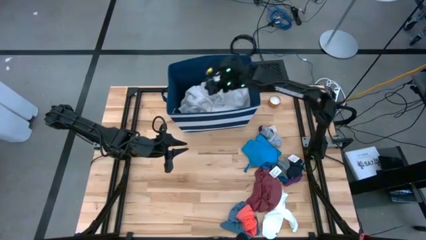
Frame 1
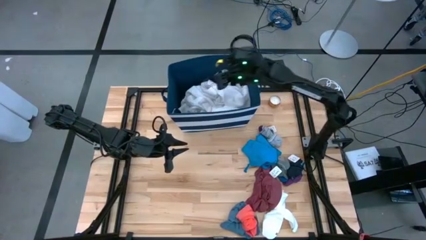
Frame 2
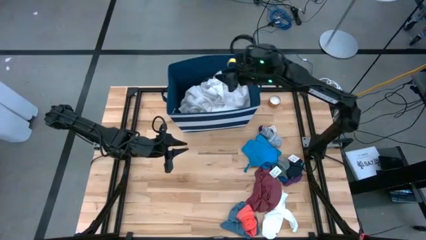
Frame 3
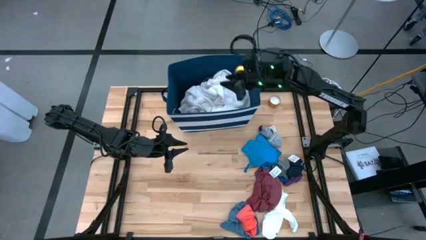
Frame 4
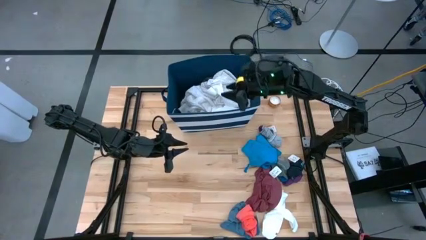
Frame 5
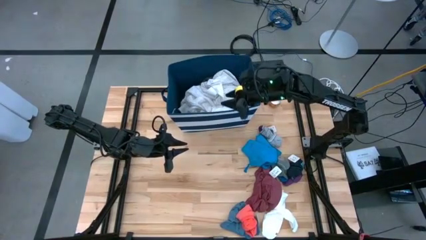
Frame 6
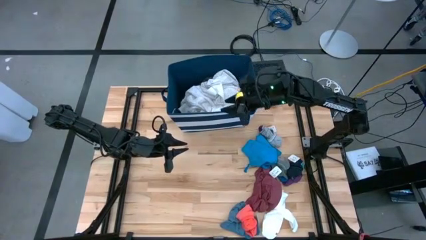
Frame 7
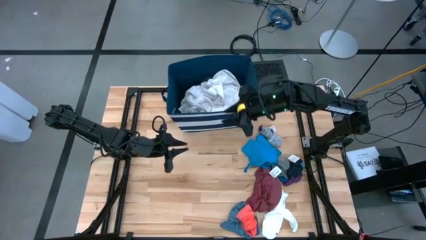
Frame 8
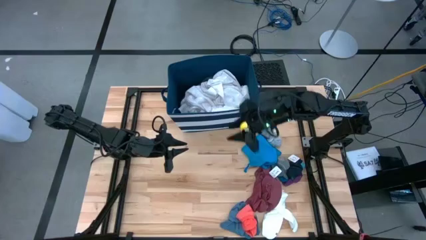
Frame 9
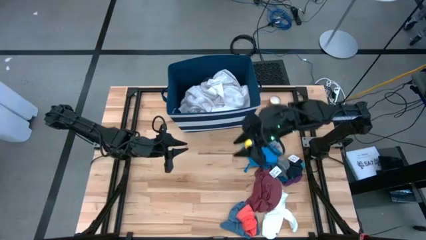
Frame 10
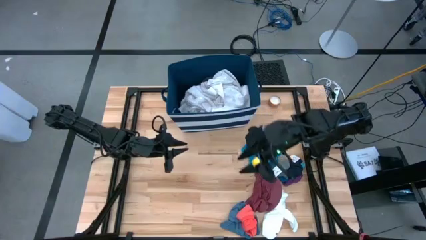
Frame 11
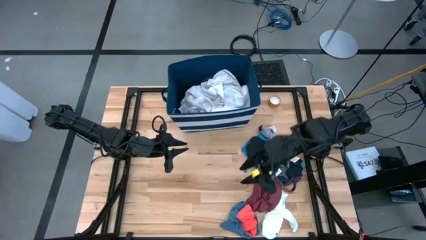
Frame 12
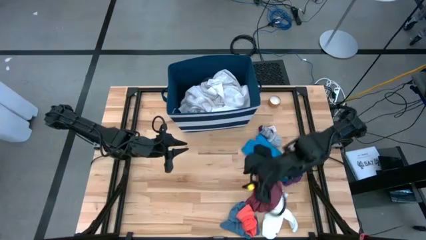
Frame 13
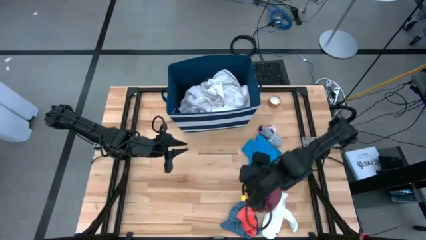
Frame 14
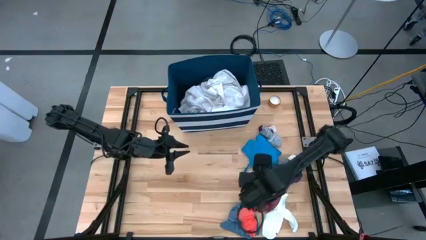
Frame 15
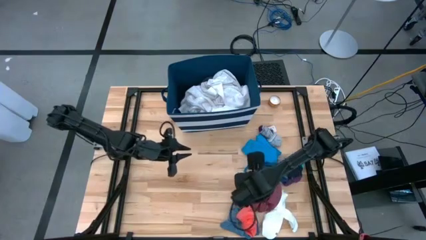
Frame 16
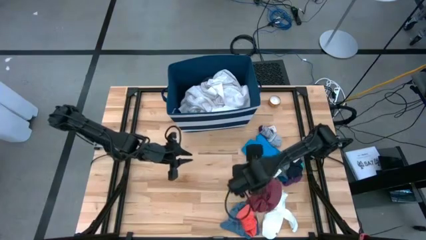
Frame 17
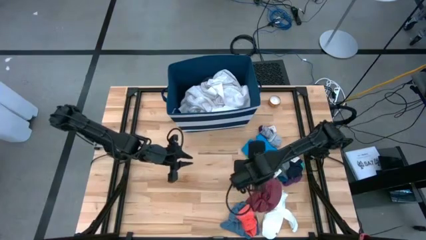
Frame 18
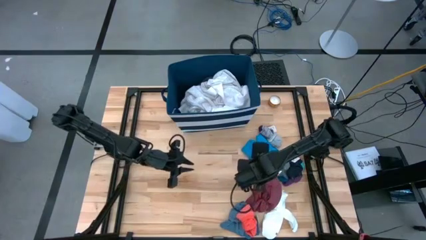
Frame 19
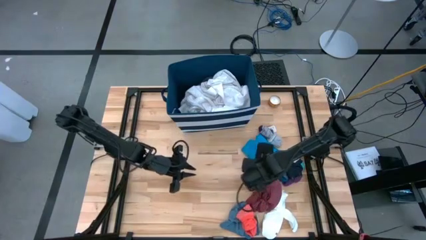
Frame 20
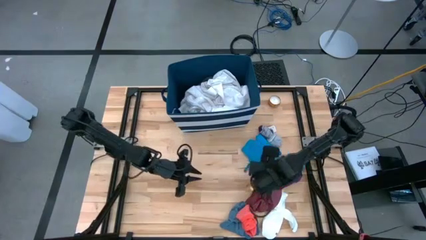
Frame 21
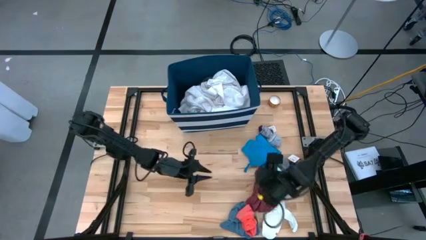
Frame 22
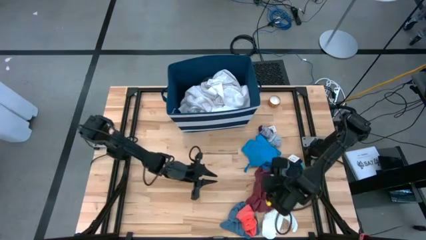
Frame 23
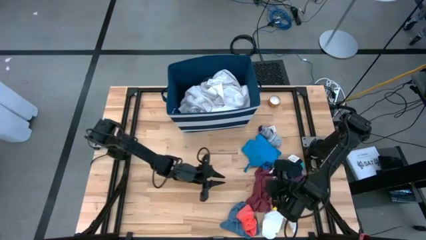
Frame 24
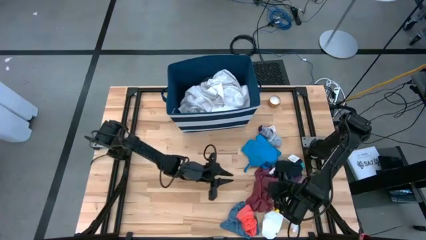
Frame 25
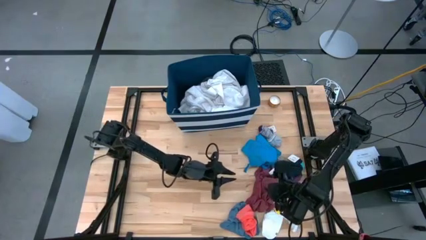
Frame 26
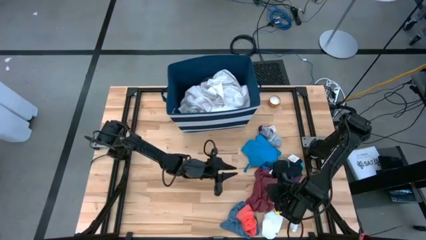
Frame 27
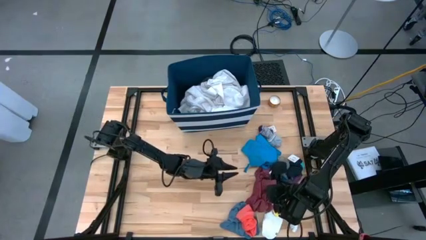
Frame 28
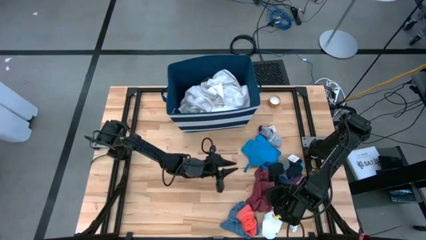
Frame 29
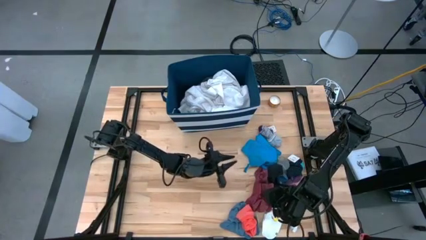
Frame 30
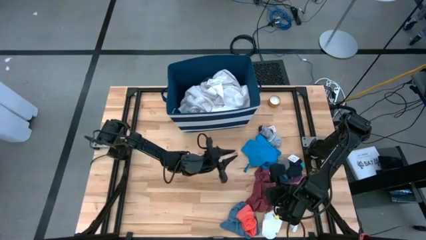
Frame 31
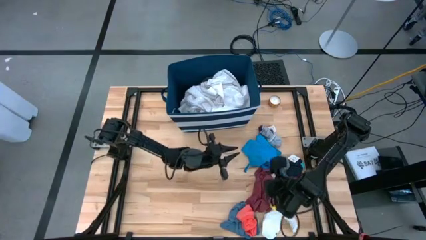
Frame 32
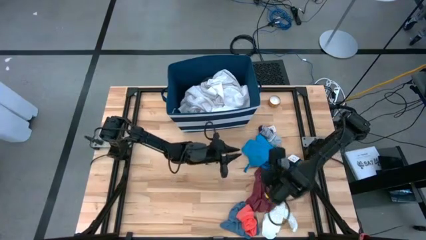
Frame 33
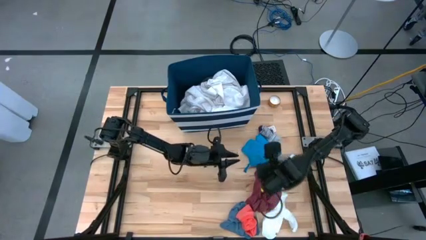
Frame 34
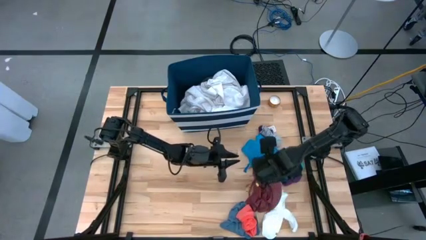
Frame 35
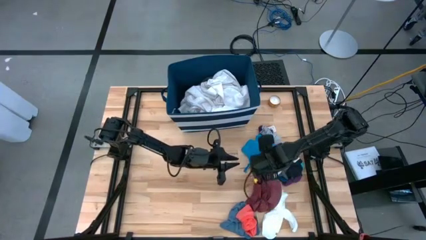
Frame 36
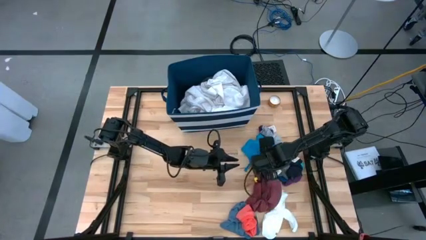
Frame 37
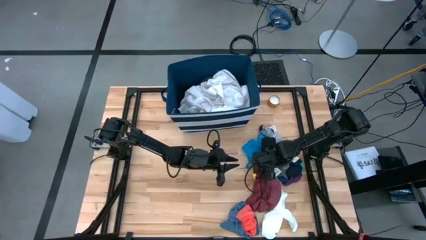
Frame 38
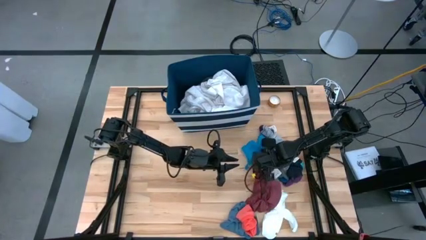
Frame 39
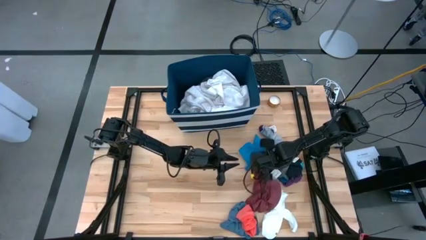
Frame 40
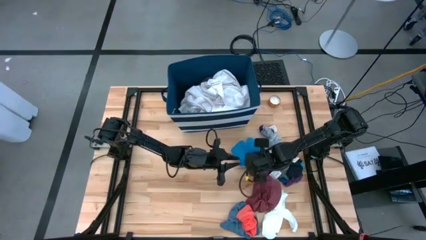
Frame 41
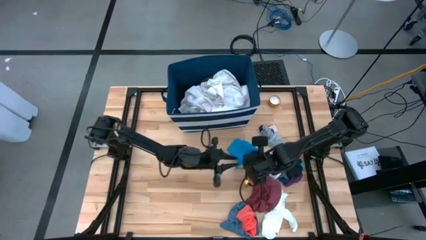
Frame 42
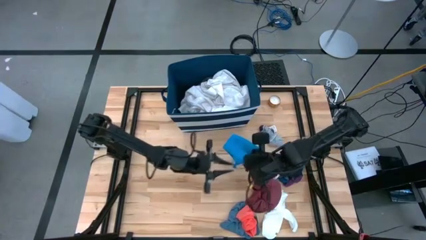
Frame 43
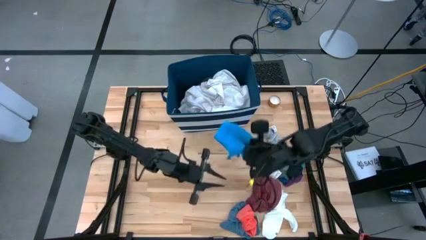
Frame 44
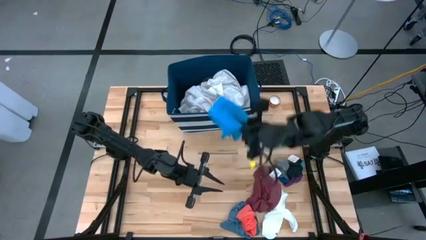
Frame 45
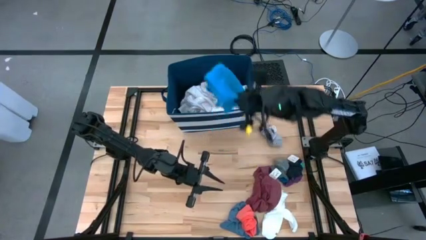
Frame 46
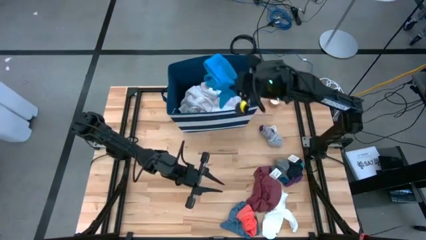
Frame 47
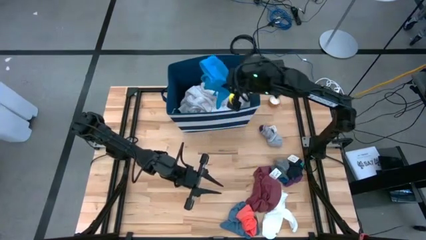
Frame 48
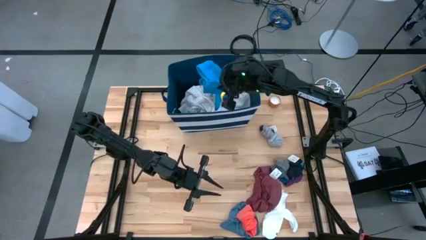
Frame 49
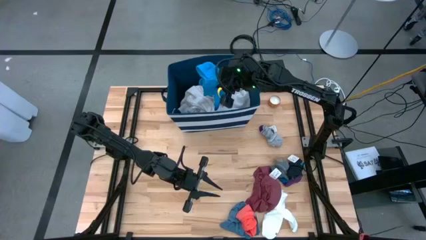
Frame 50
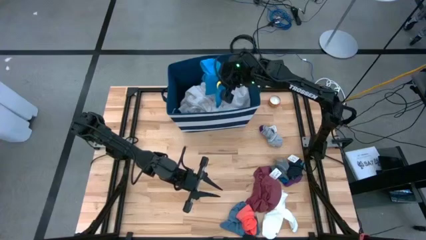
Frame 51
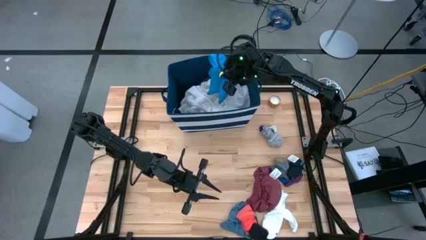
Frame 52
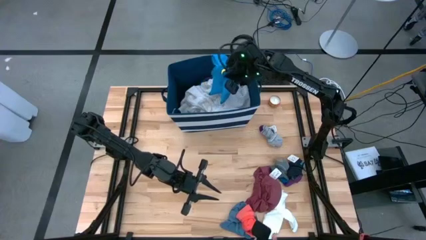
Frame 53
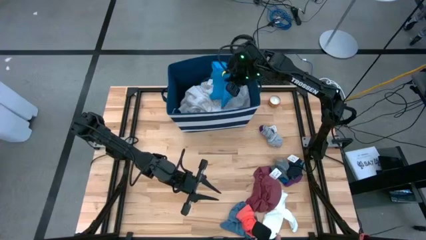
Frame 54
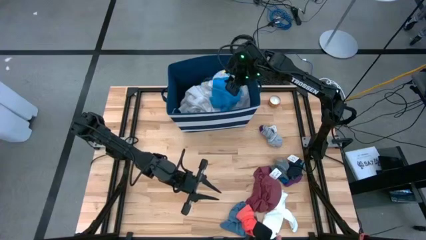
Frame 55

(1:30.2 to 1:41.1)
Task: Sort clothes
Put the blue shorts into the blue laundry organizer

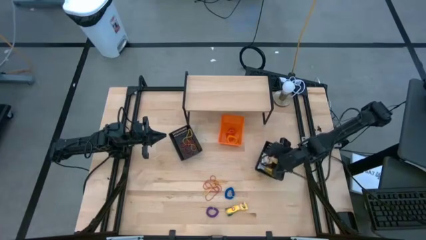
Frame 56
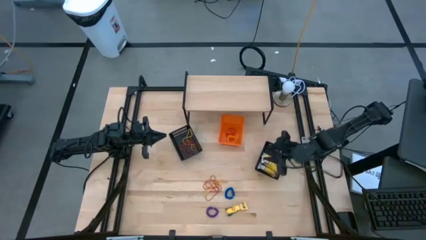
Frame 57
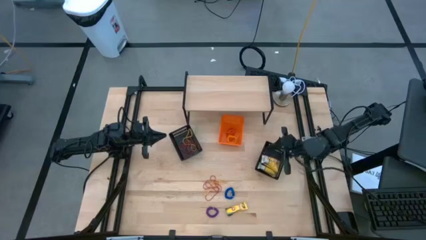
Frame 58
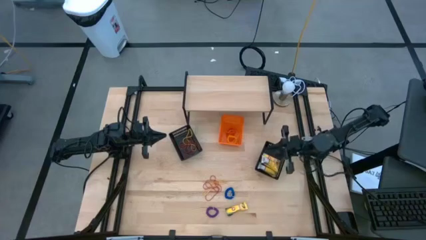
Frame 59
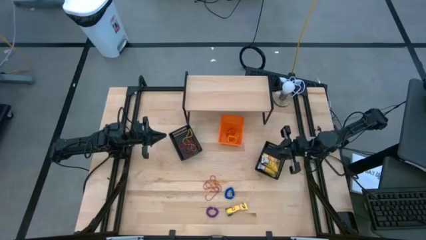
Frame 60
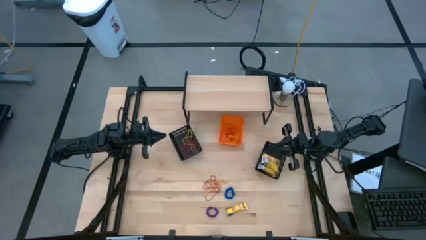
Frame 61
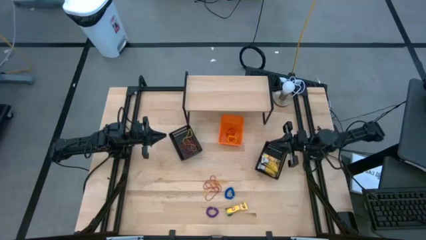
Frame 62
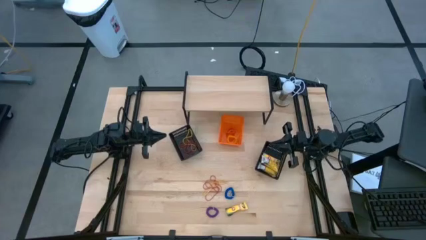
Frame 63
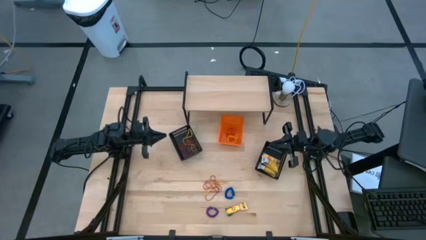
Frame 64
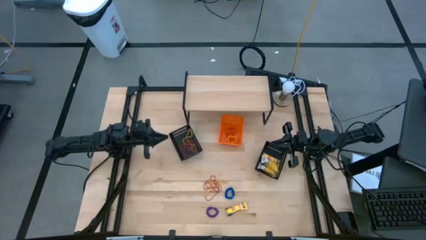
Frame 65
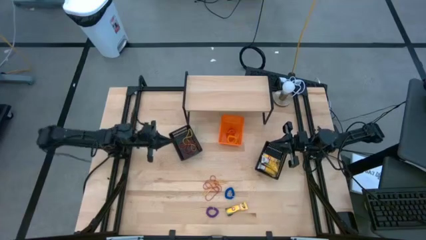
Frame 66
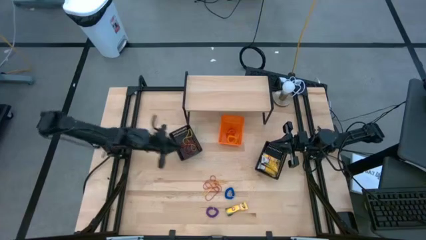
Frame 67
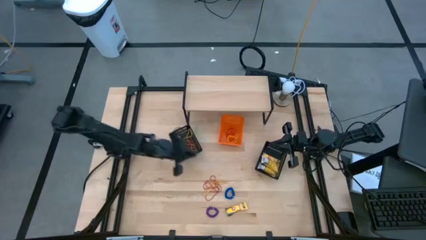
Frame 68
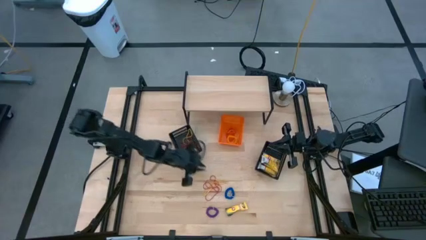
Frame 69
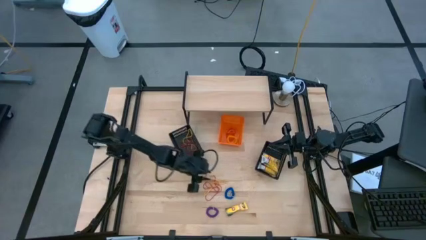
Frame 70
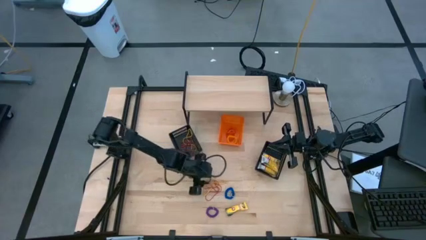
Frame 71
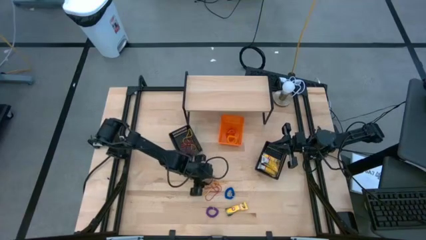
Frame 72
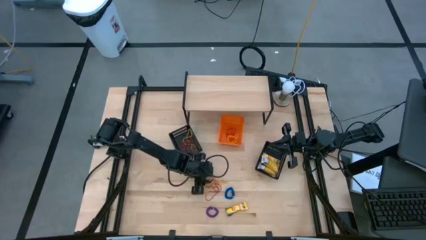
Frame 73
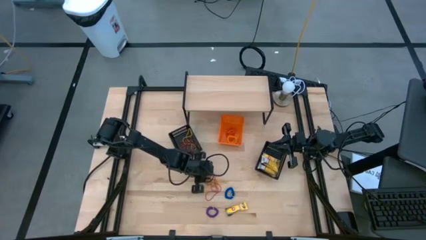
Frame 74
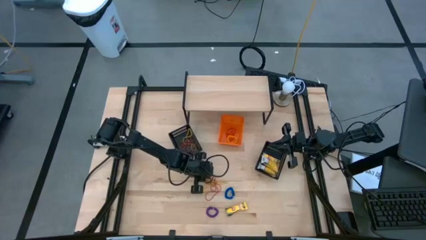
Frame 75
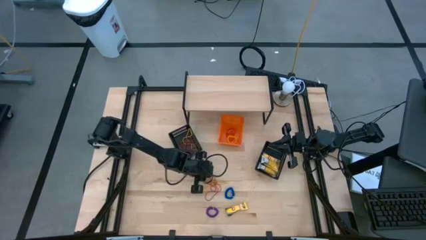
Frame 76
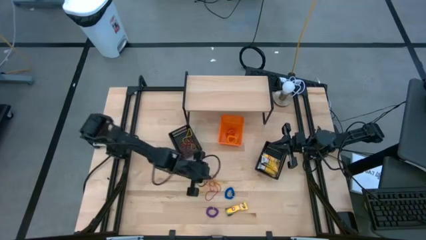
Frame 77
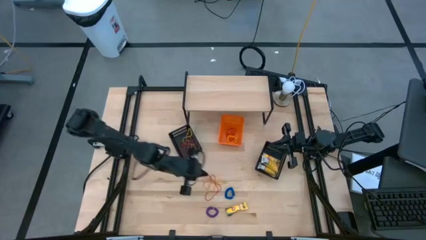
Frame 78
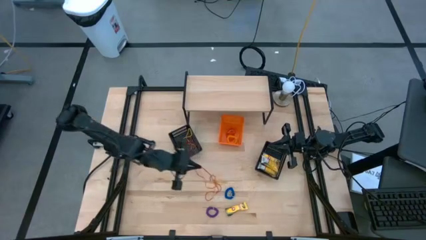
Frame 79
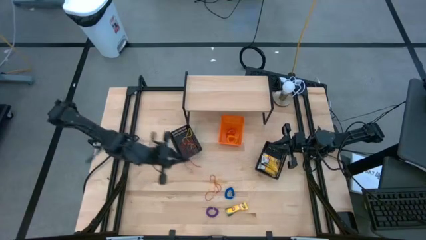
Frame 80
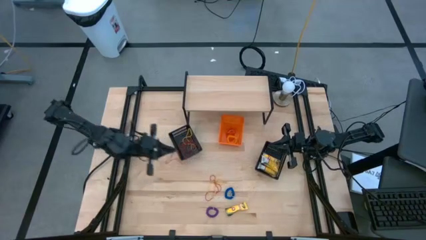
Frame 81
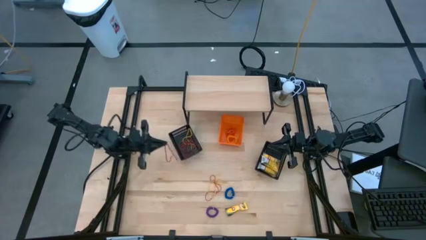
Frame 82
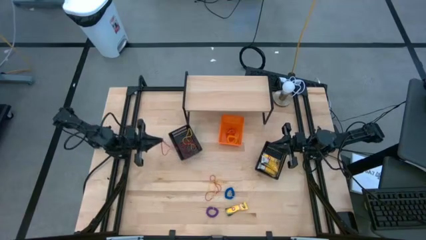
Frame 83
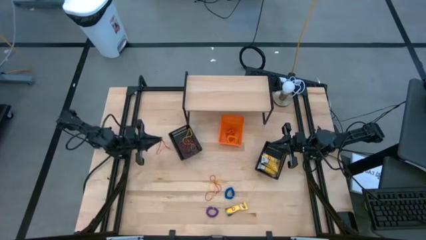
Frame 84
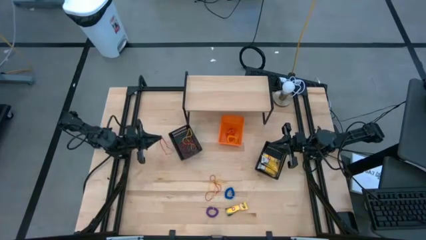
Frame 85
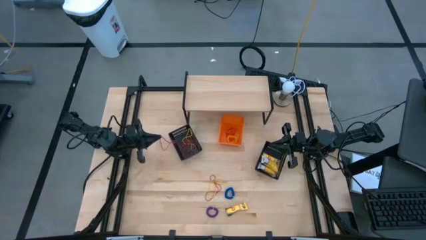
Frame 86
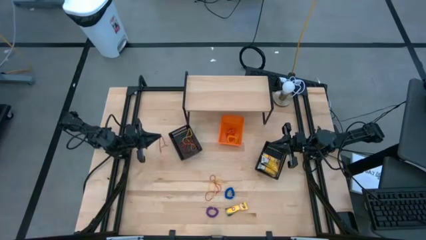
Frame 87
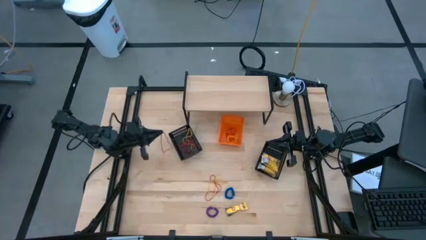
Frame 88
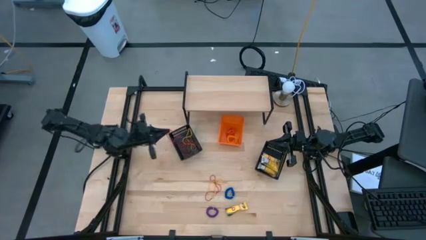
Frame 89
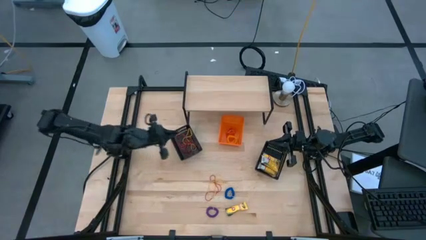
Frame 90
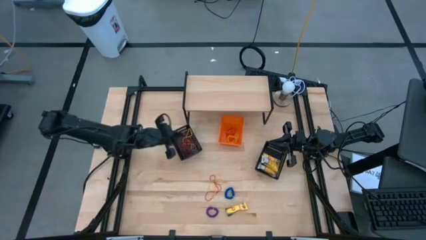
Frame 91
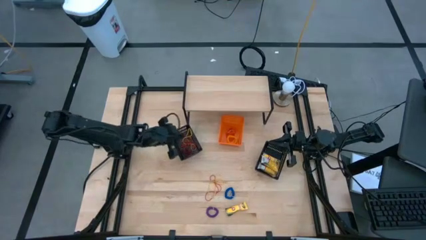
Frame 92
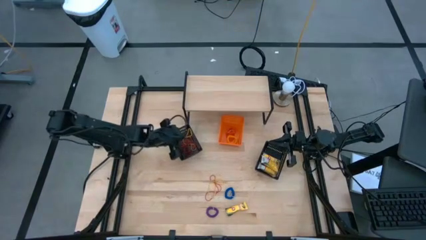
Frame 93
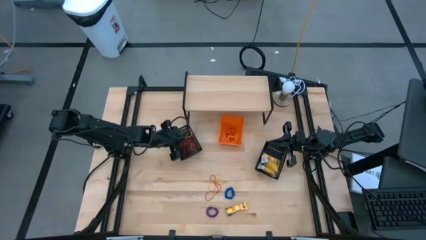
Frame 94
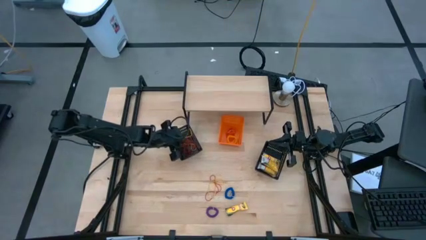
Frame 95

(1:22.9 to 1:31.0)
Task: Pick & Place Office Desk Supplies
Put the red rubberband into the left black bin
